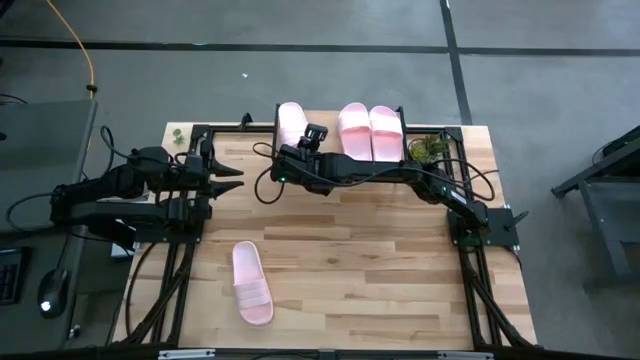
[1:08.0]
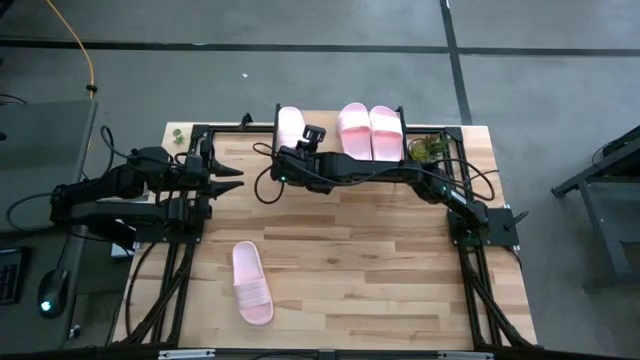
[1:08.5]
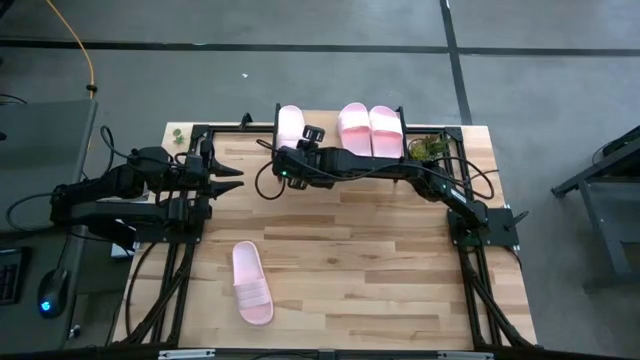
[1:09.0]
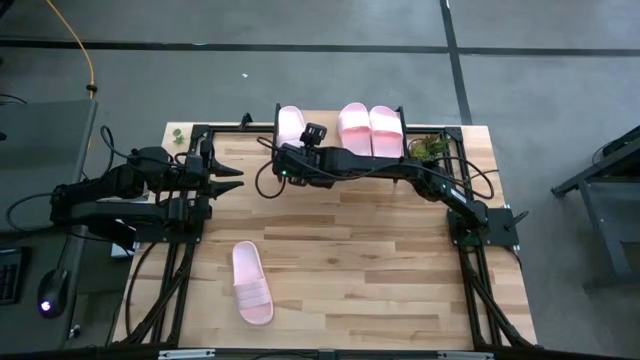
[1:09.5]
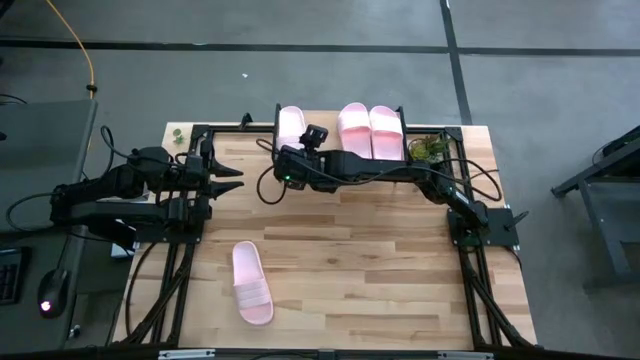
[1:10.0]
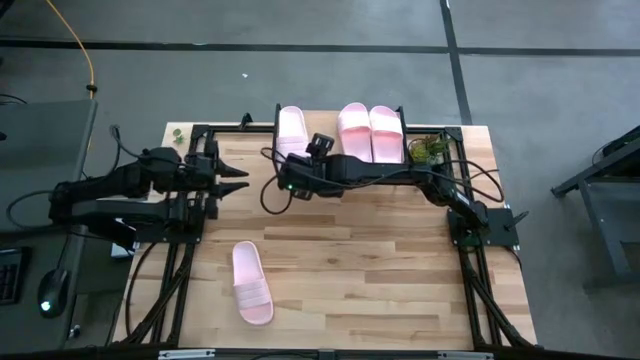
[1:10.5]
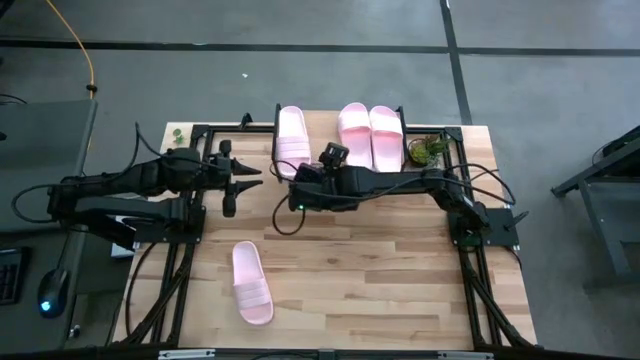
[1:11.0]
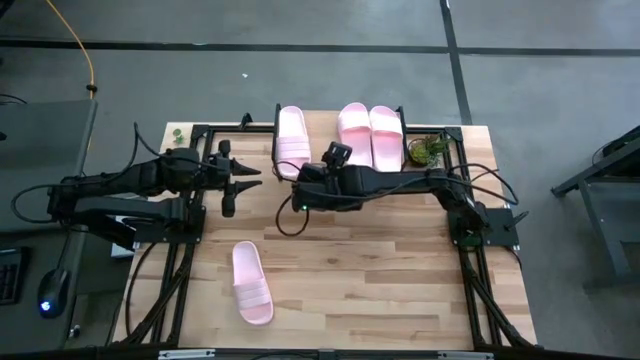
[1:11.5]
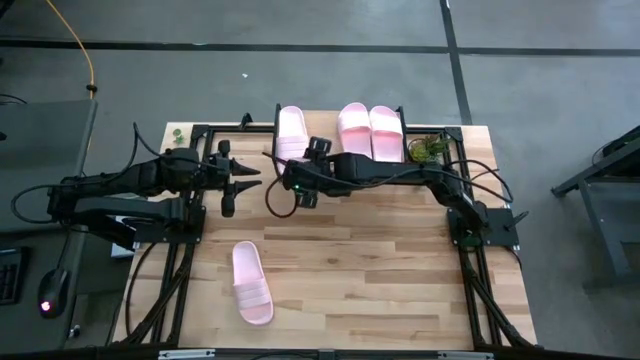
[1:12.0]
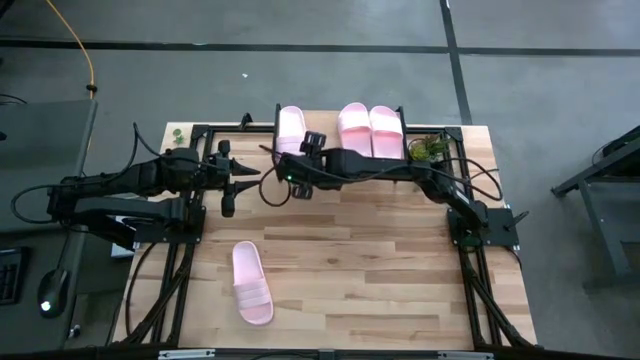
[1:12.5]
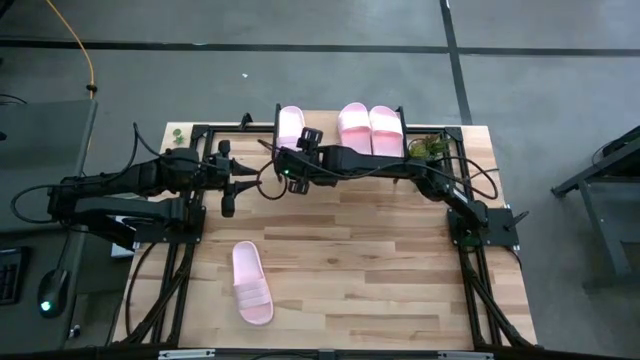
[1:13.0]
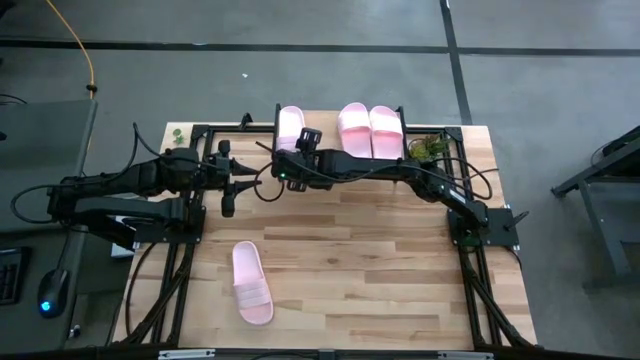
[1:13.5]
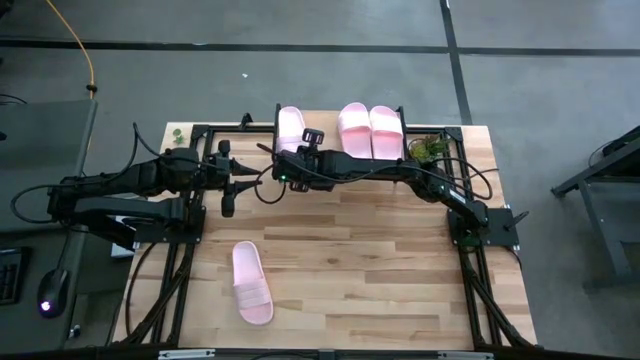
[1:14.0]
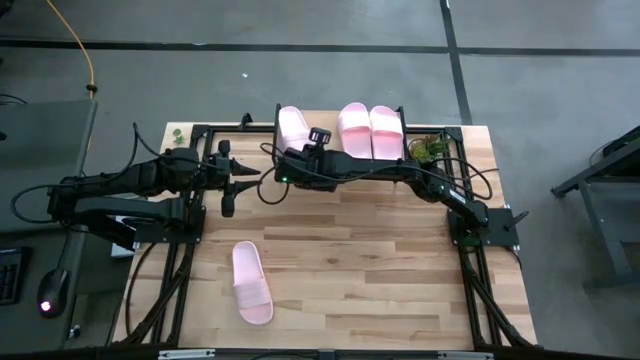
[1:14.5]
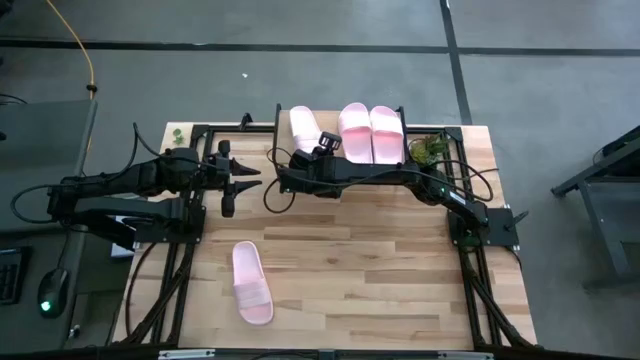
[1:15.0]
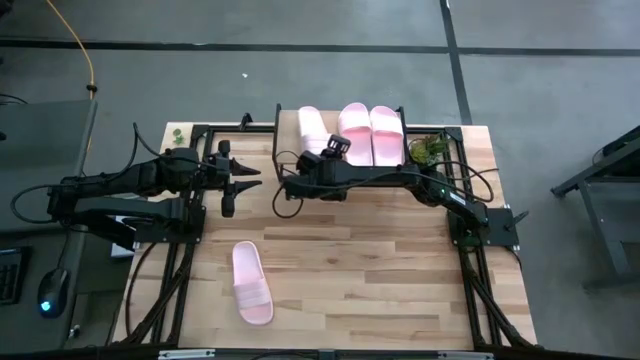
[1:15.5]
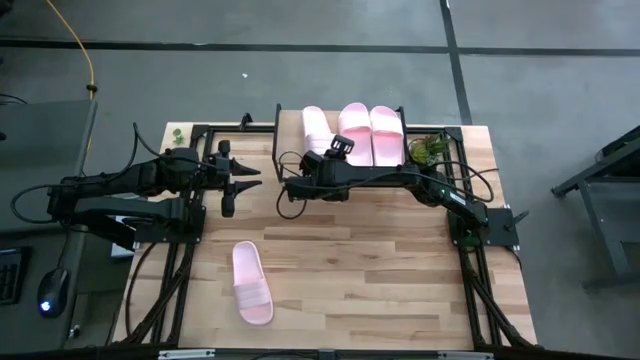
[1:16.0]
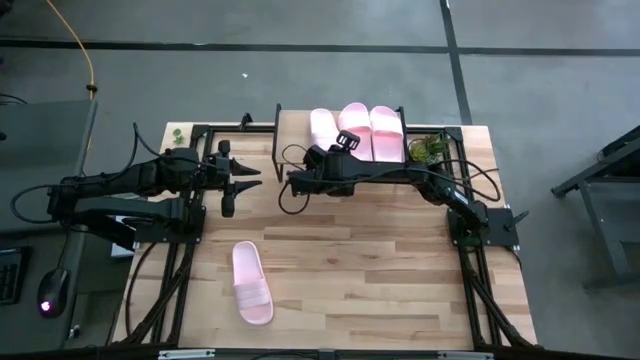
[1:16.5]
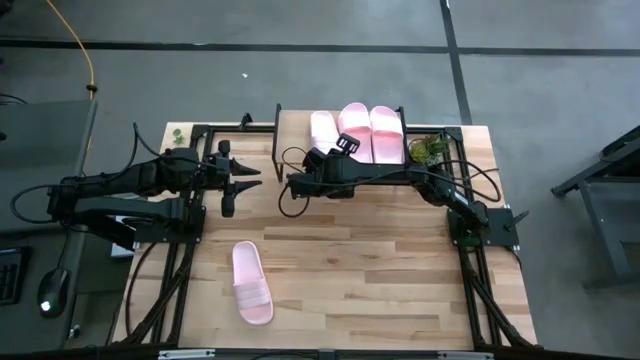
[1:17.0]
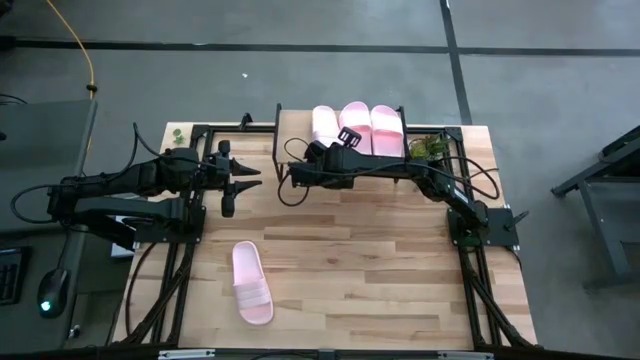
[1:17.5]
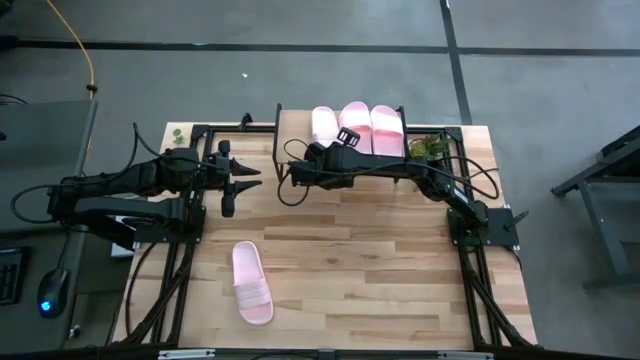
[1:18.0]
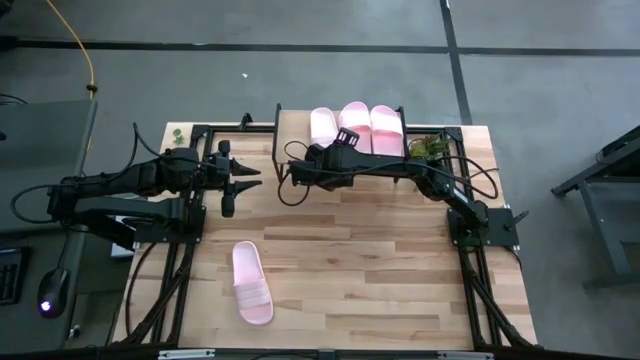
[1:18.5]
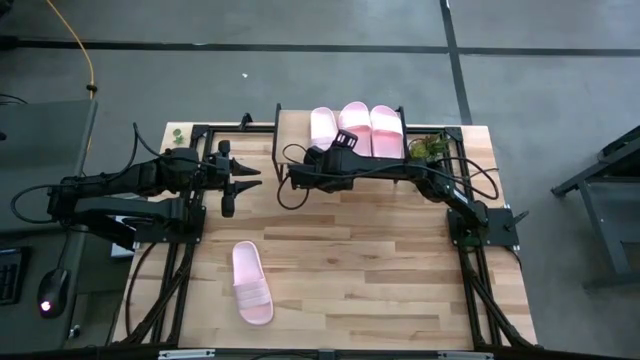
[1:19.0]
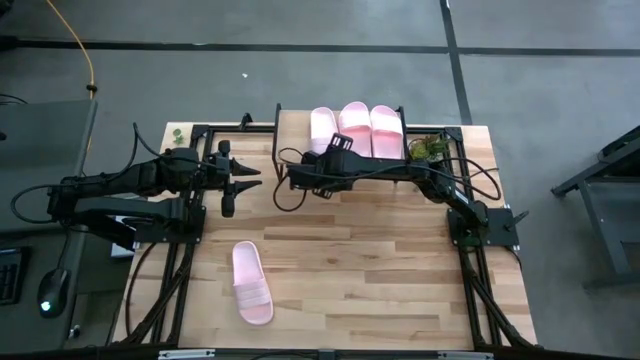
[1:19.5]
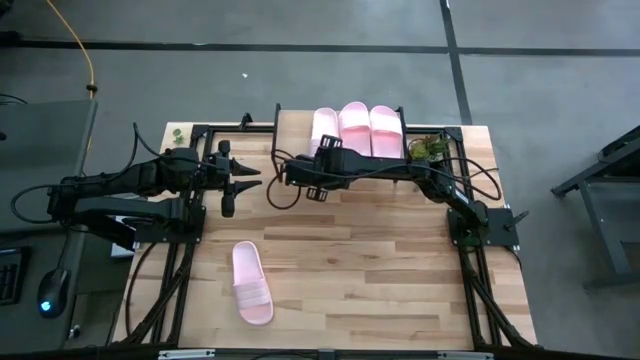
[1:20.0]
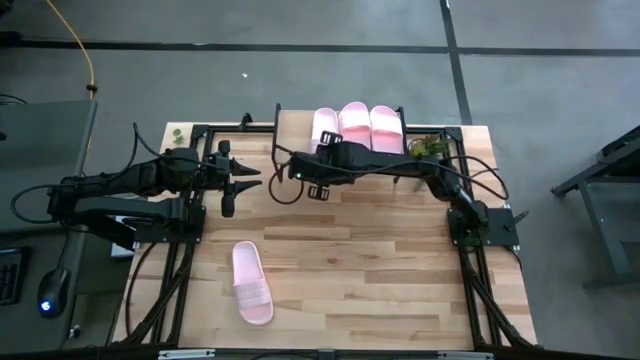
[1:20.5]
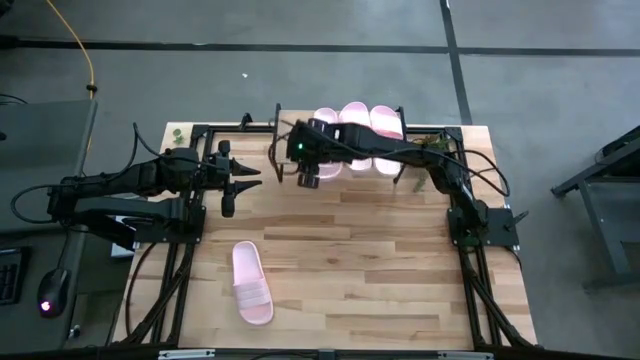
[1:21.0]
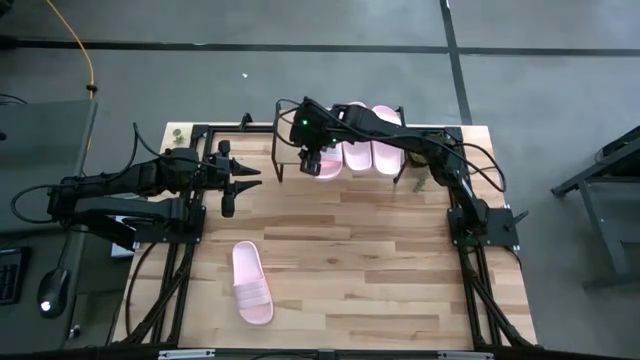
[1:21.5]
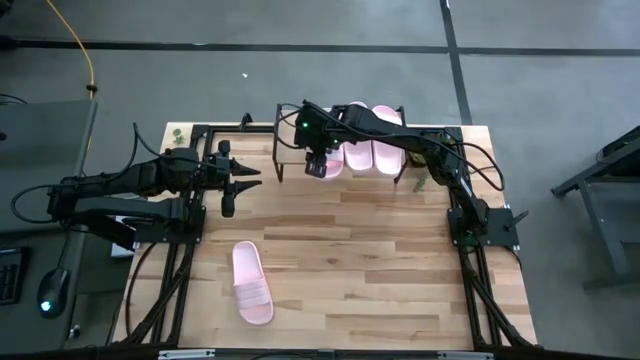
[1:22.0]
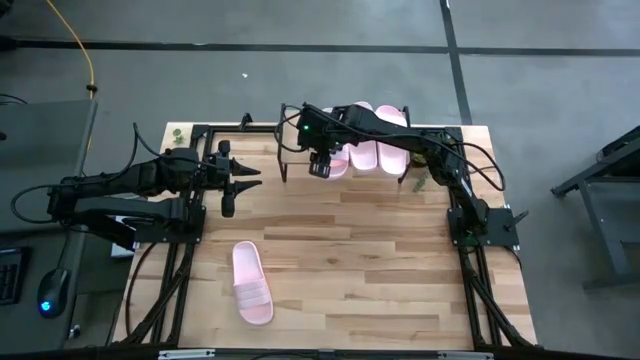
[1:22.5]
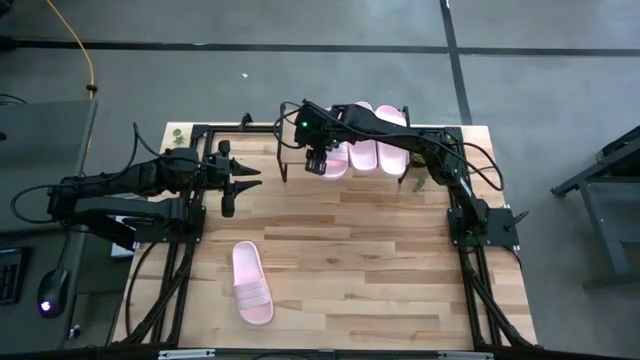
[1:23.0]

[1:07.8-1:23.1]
Task: Pick and place slides into the shelf
Put the pink slide on the shelf
